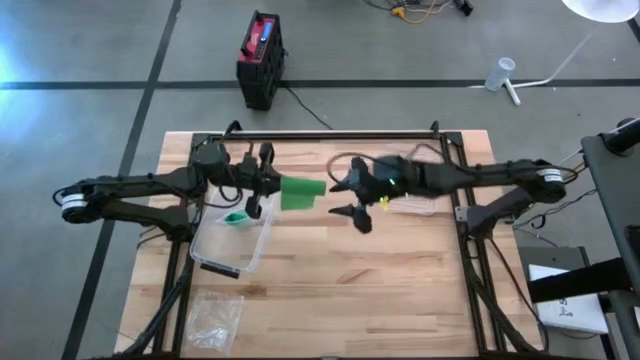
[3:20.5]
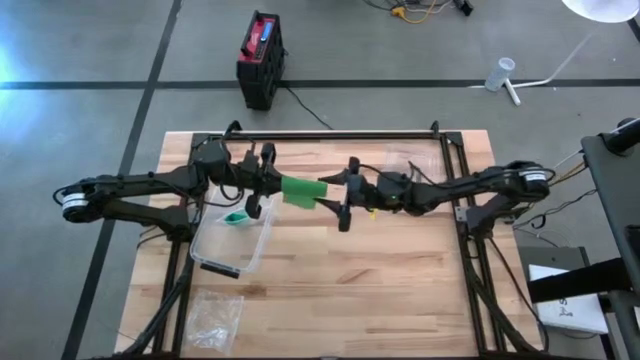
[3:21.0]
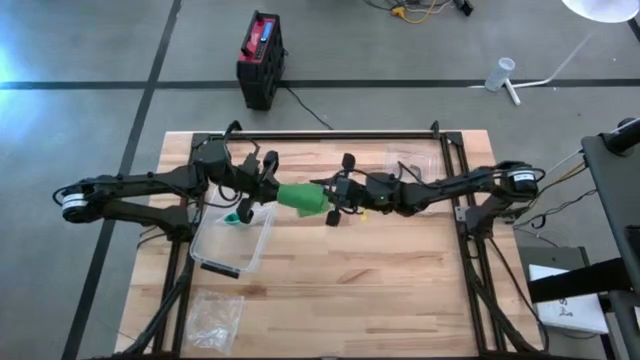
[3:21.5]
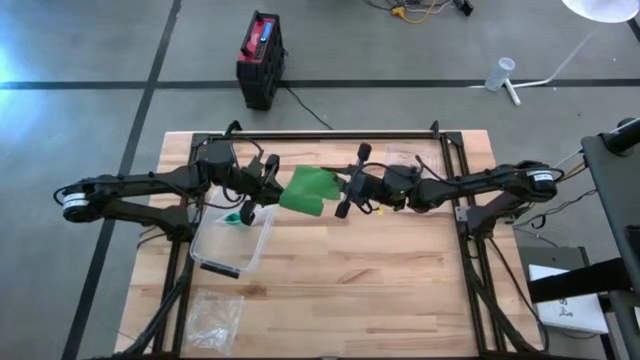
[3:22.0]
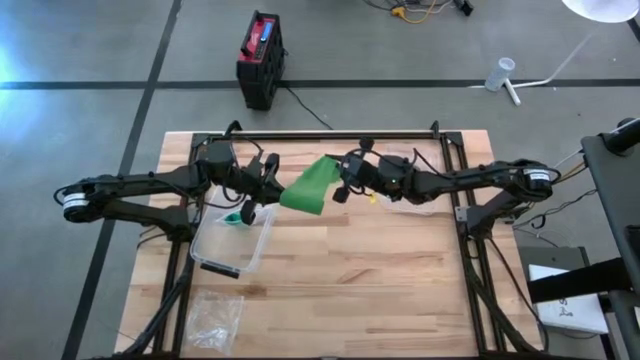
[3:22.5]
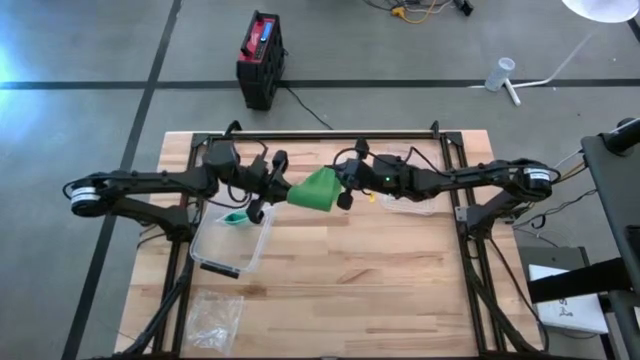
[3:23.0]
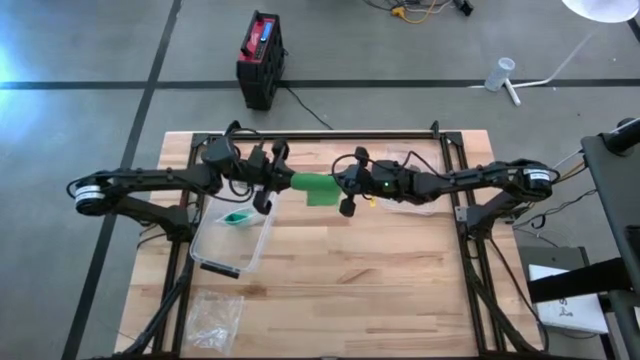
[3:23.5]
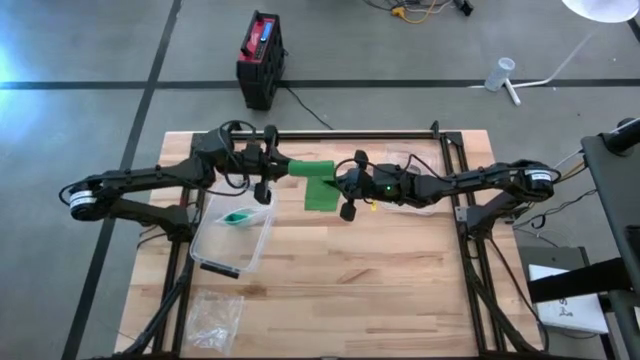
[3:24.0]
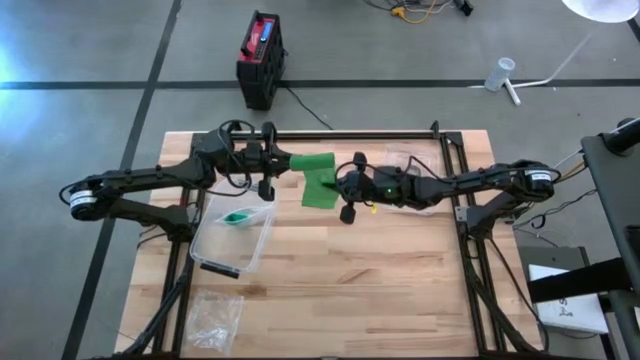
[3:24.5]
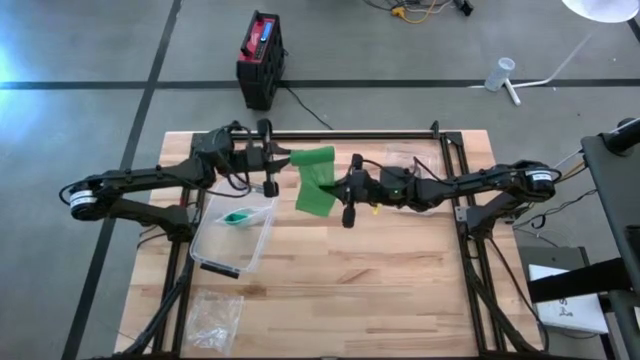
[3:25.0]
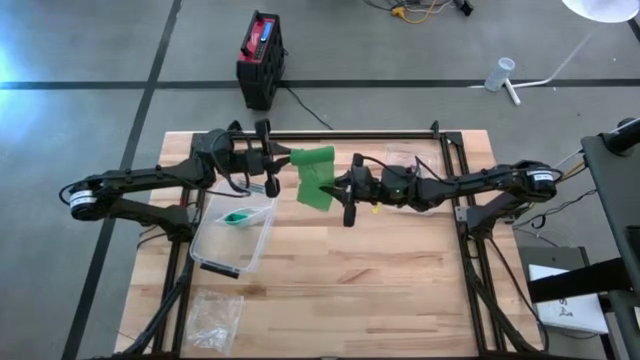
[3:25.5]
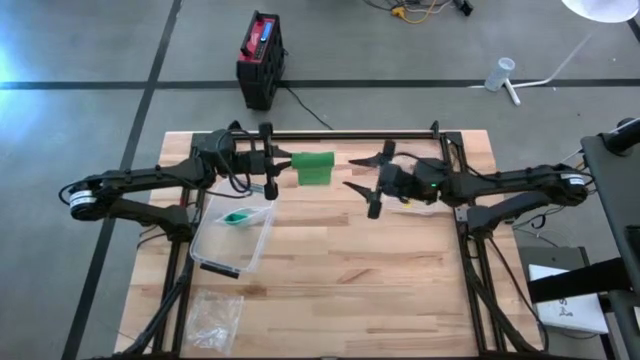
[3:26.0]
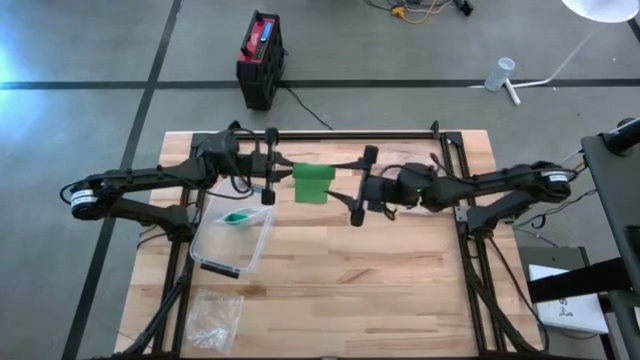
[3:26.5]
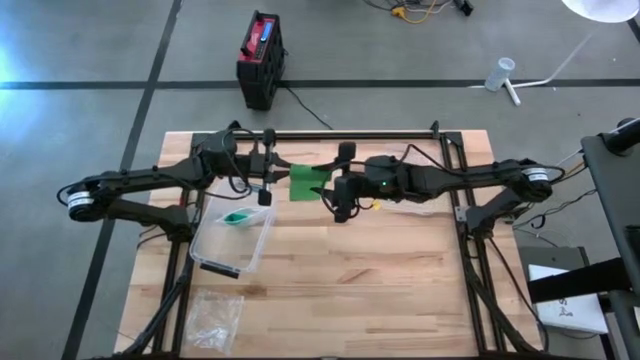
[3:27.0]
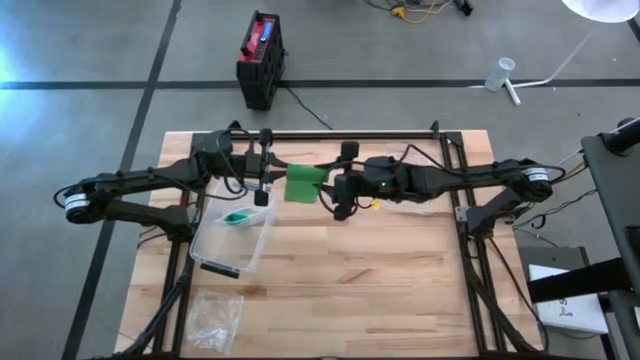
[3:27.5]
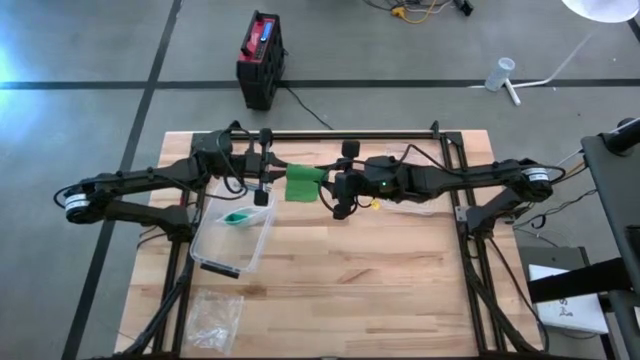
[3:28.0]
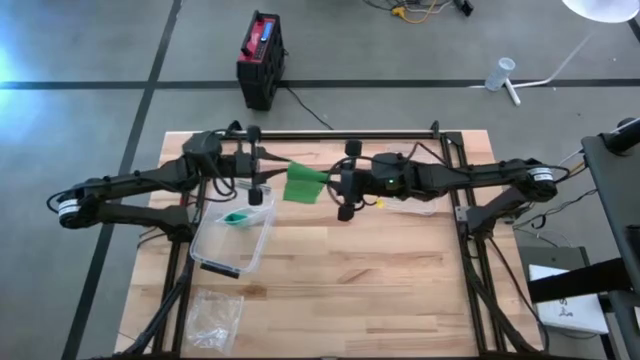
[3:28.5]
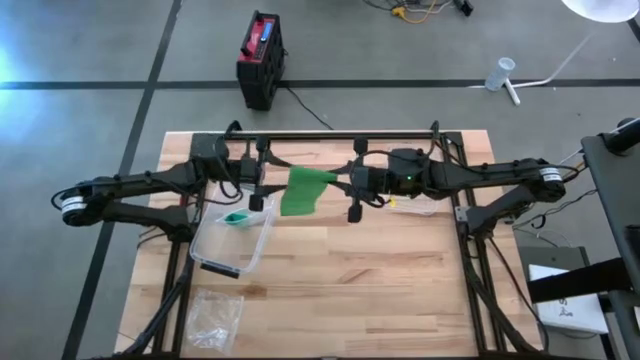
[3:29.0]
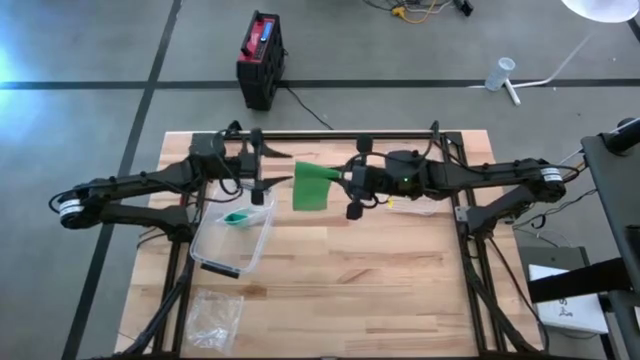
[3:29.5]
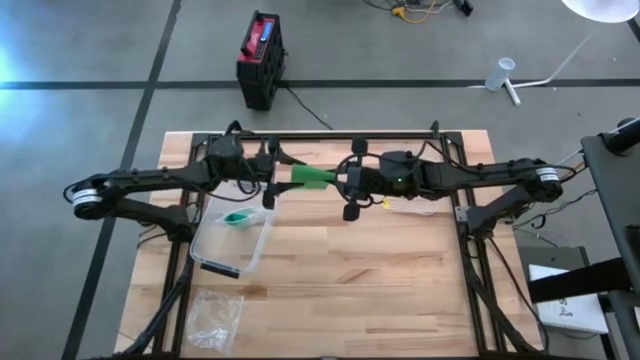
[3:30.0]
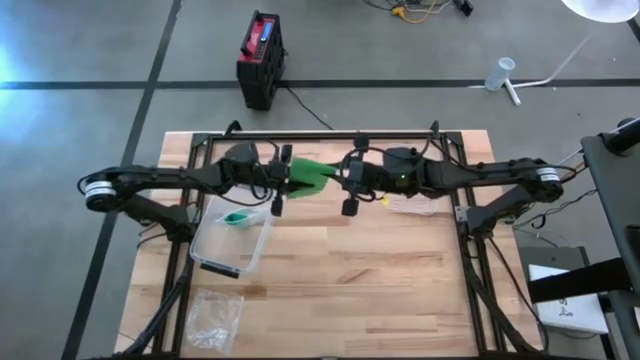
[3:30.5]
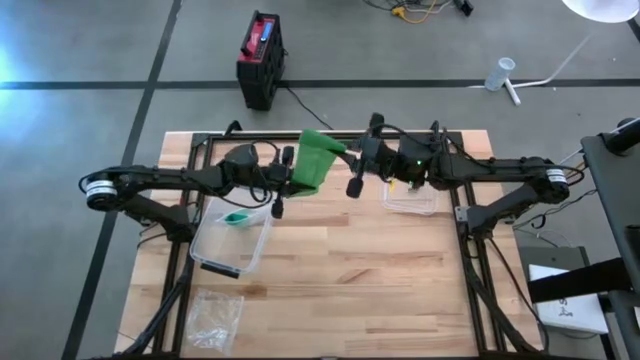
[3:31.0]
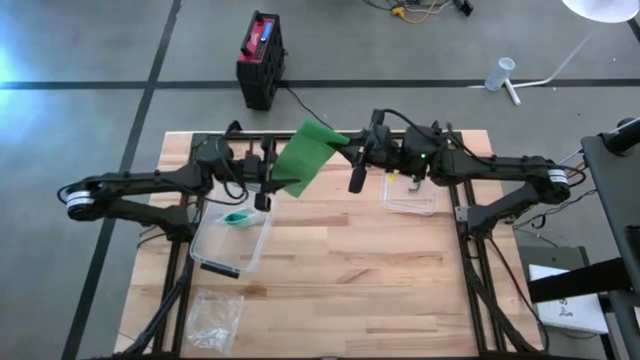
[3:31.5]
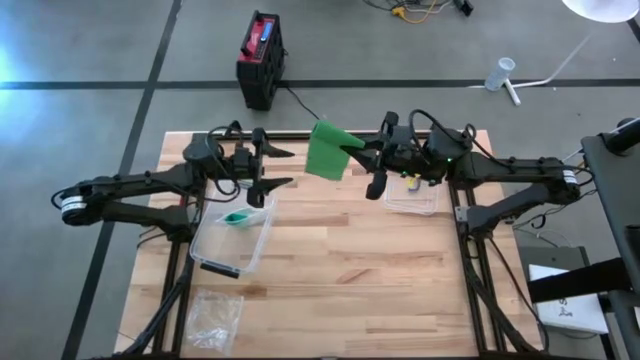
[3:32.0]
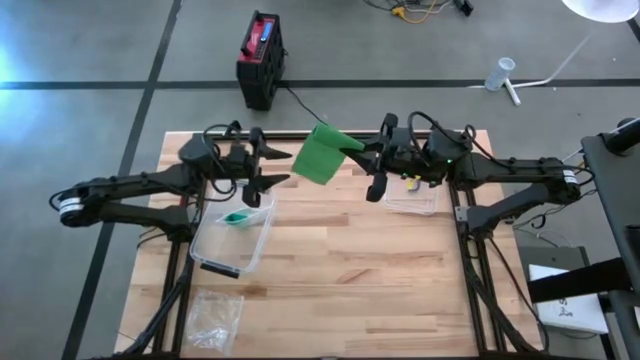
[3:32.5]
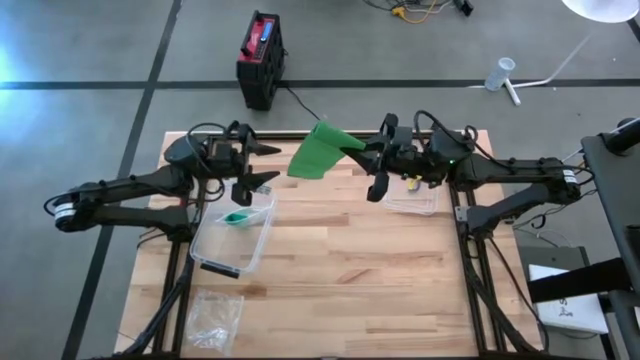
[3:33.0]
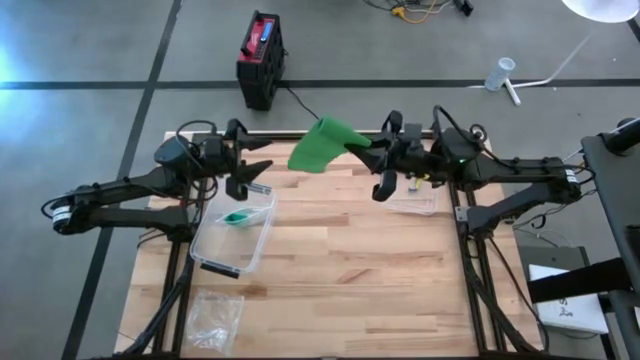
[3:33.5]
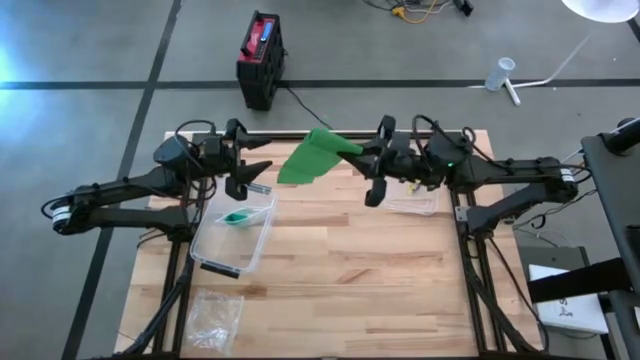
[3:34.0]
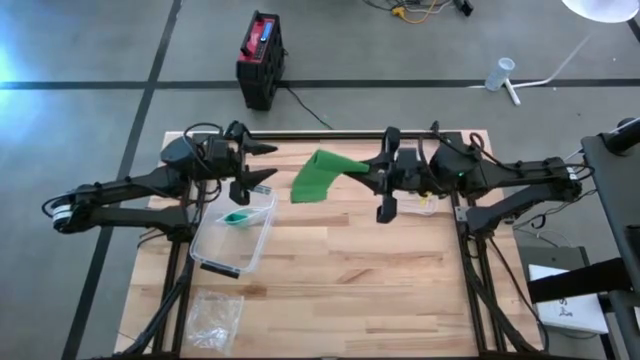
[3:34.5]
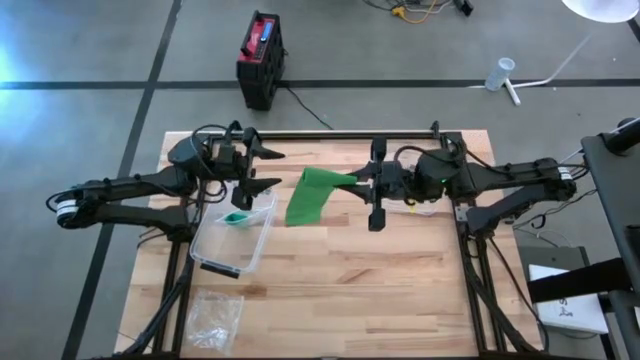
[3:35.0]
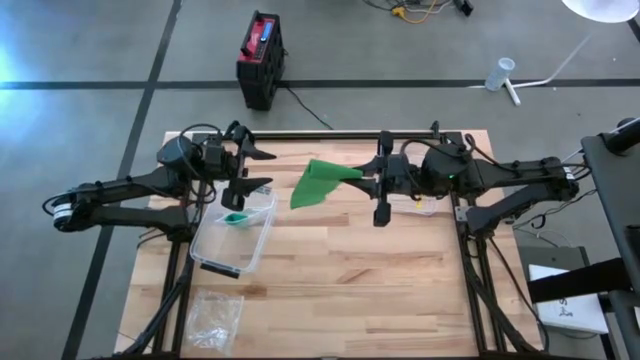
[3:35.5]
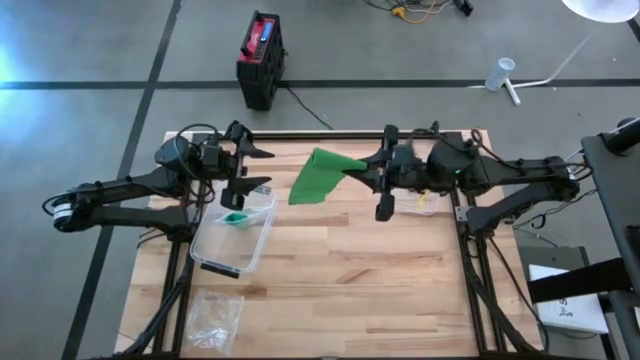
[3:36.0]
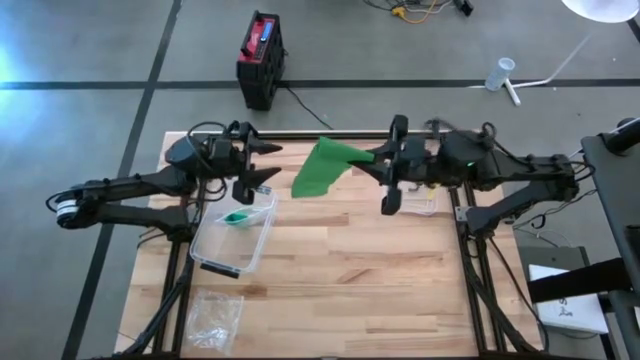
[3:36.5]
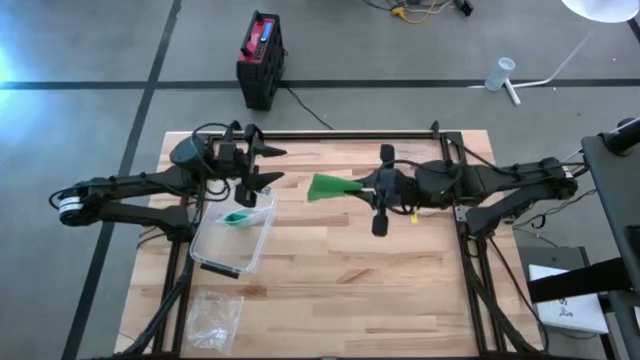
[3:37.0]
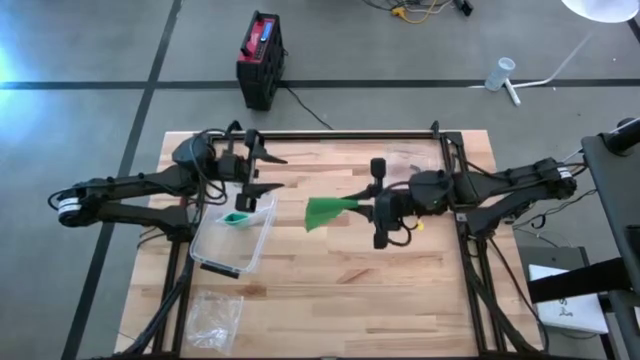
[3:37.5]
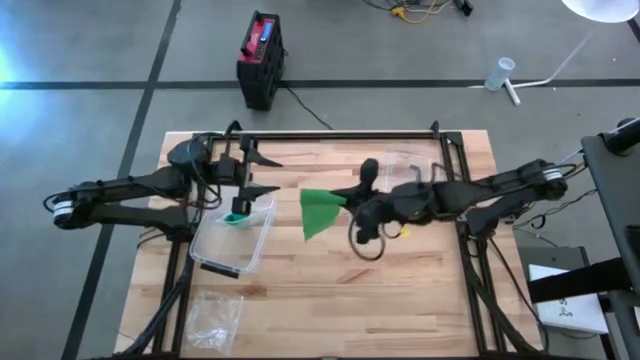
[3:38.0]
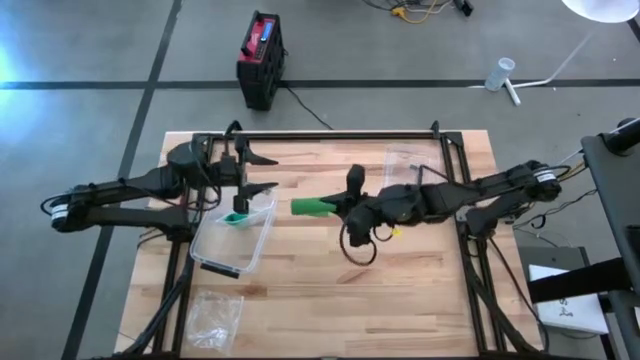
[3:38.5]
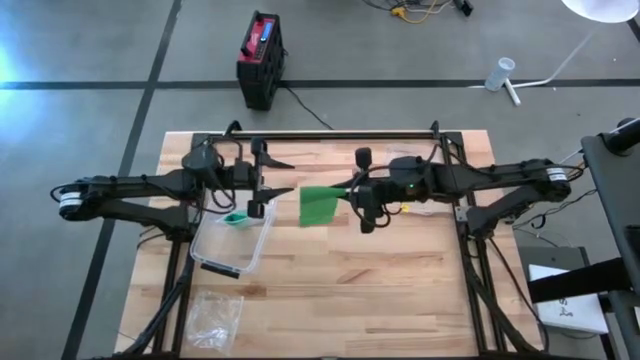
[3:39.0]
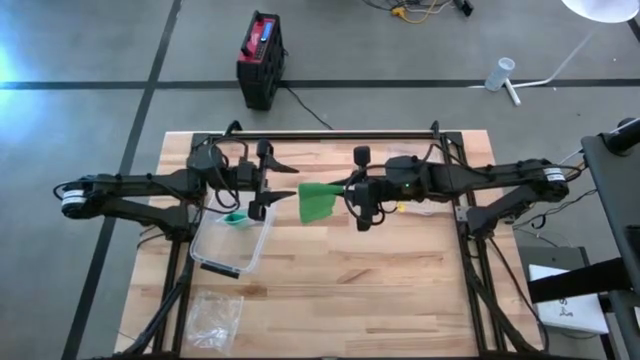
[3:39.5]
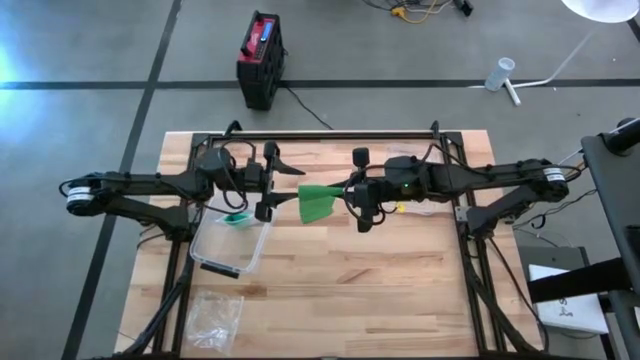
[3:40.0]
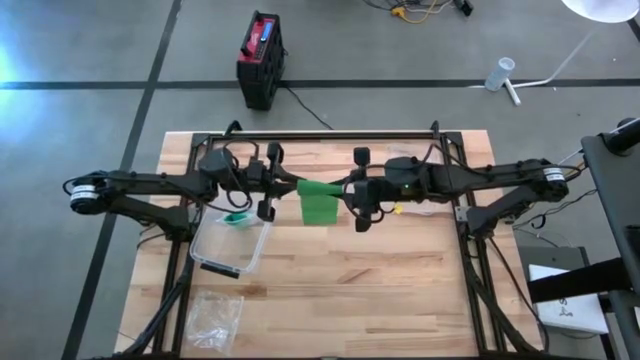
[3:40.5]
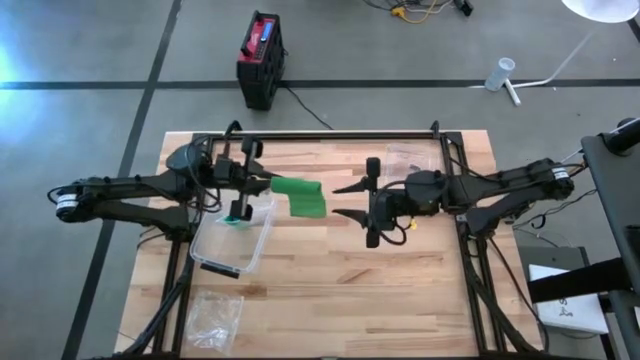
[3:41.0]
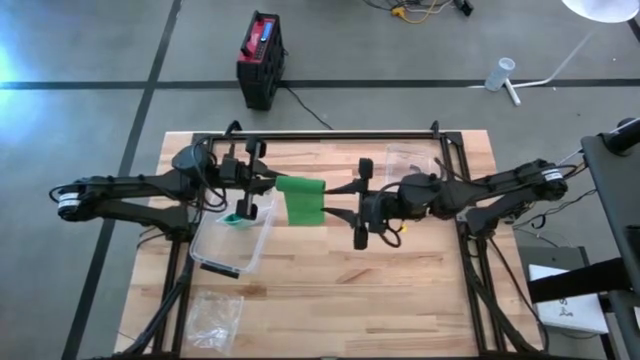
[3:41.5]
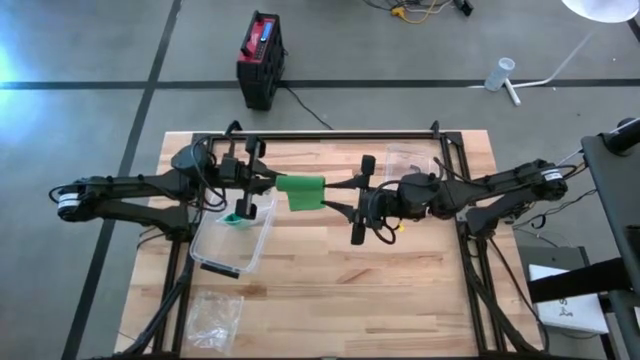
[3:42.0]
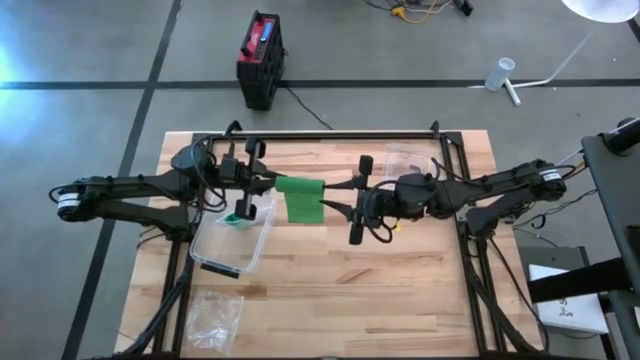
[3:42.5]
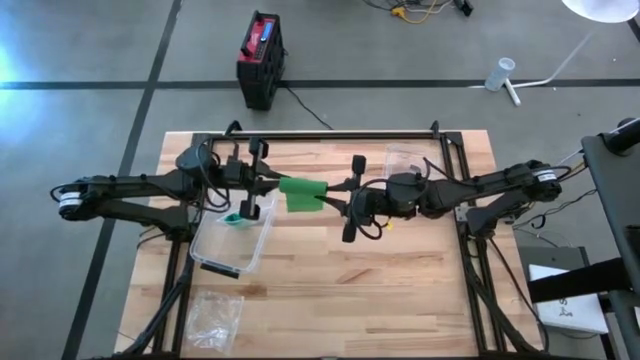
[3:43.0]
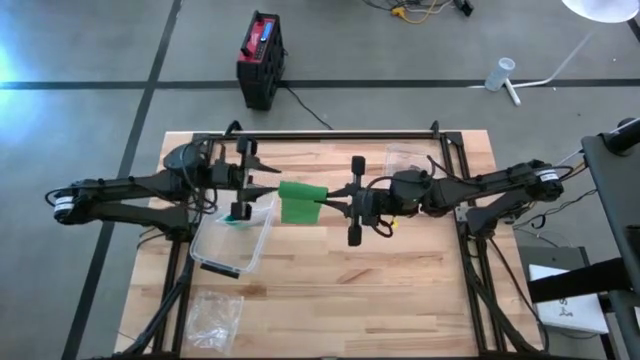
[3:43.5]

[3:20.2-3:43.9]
Task: Roll bandage
Roll the dark green bandage
